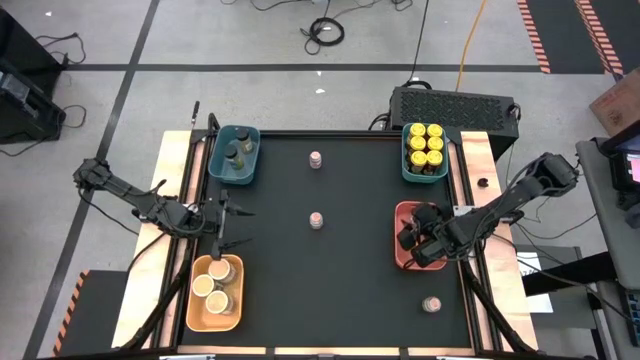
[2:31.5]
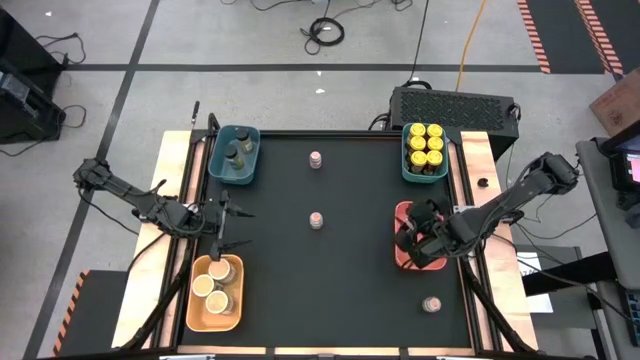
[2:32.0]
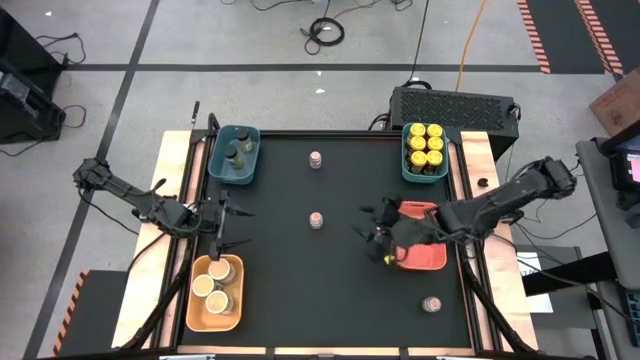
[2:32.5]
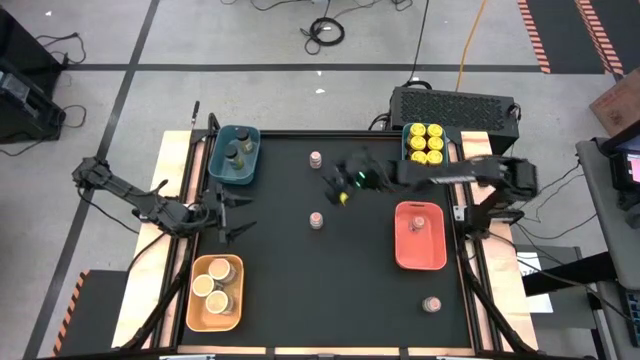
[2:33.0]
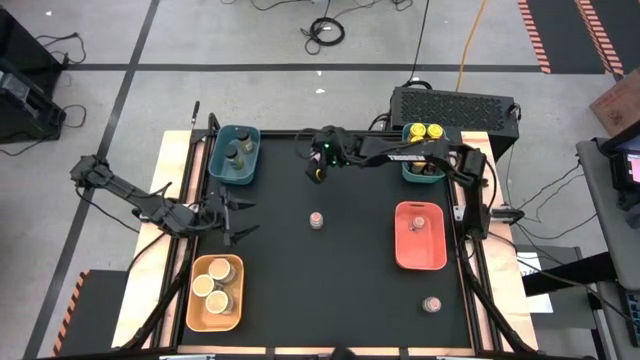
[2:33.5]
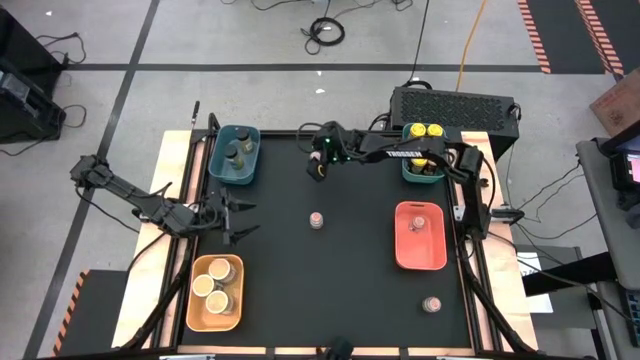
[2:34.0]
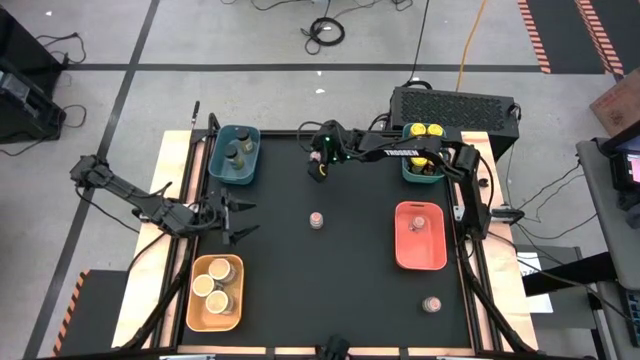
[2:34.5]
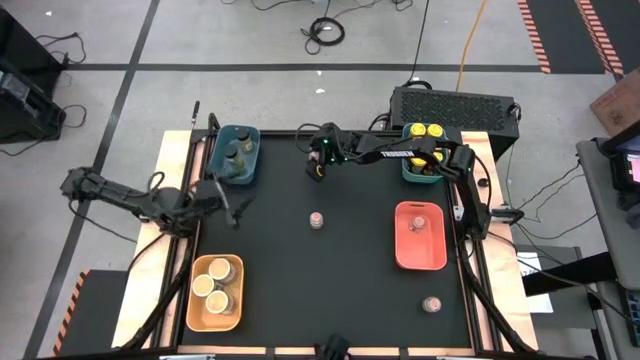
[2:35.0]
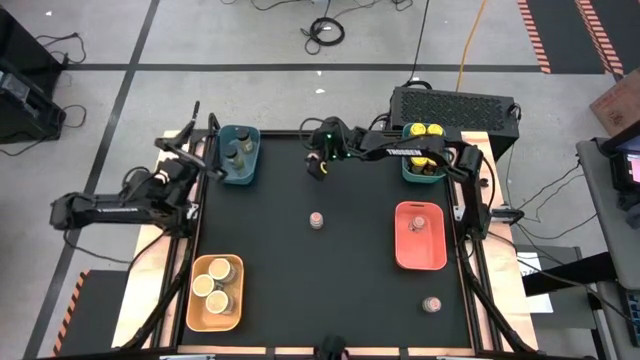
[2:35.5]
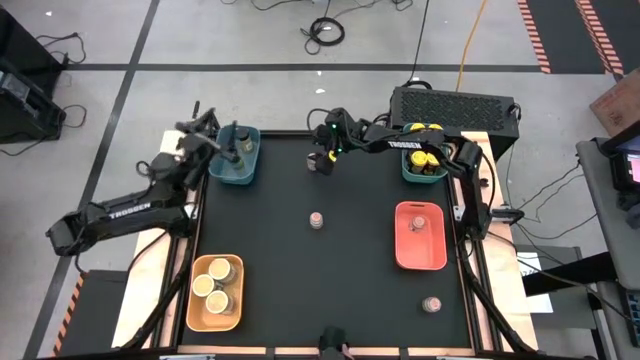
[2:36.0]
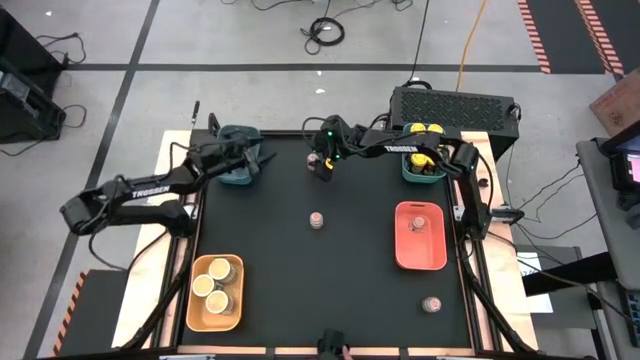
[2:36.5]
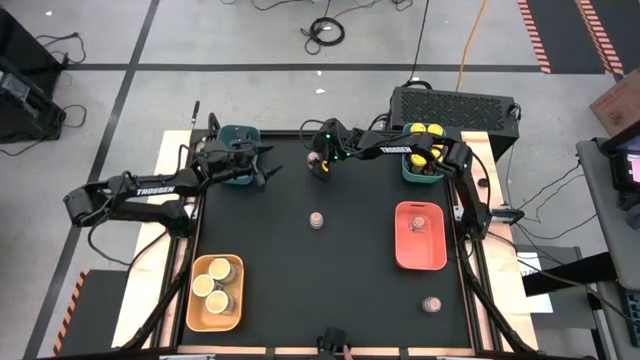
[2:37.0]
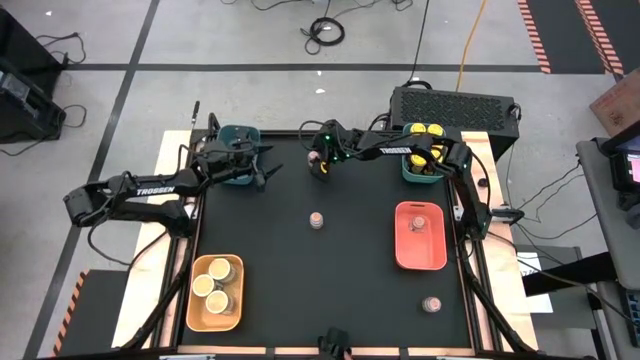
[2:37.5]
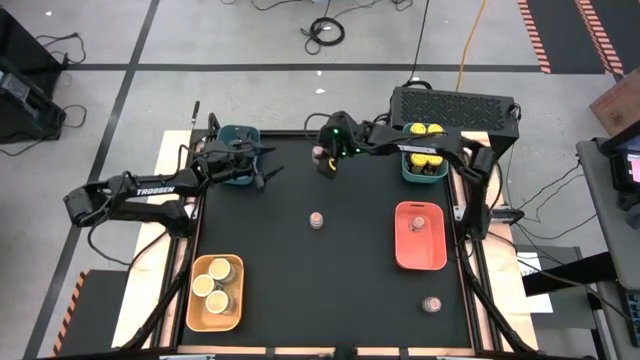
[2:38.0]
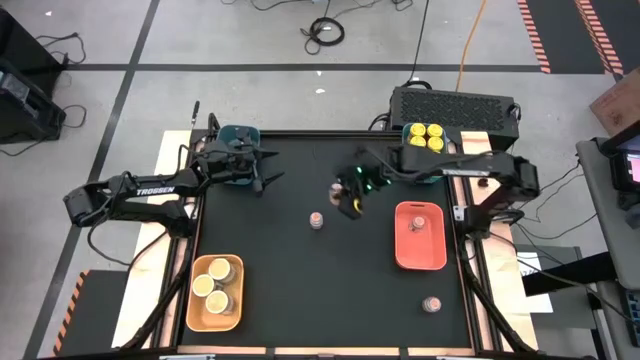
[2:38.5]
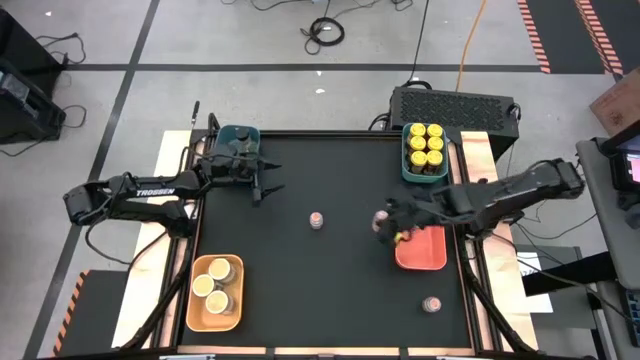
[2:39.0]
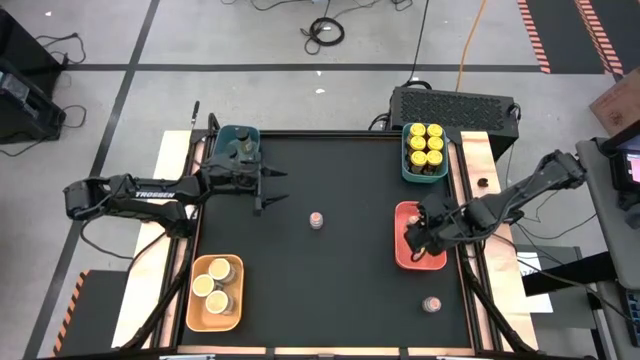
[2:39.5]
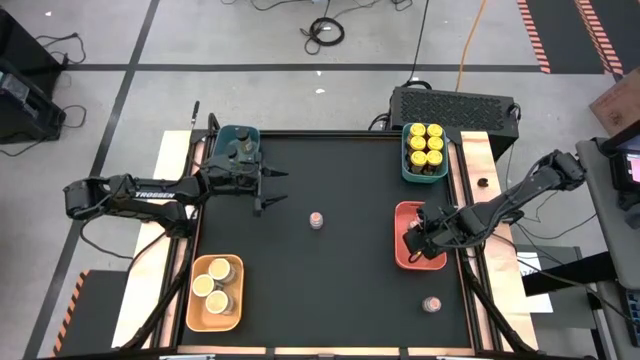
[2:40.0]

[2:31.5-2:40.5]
Task: Sort spices by type
Put the brown spice bottle into the orange bin

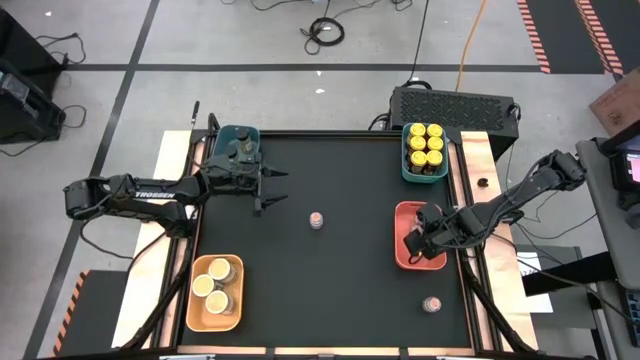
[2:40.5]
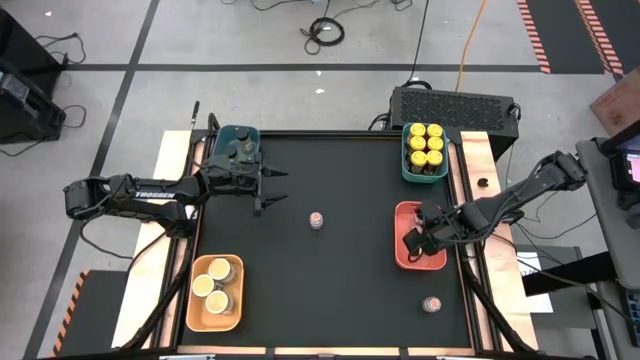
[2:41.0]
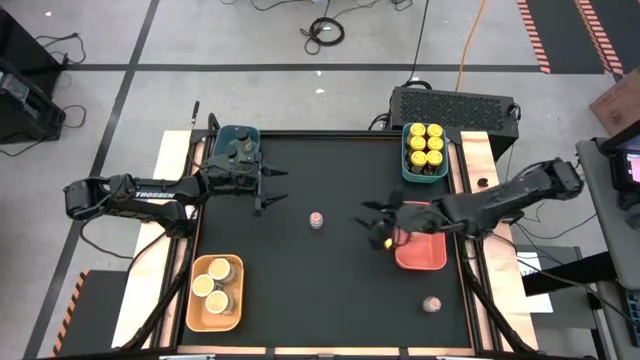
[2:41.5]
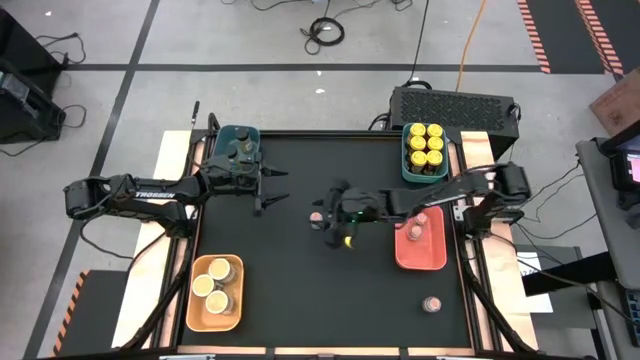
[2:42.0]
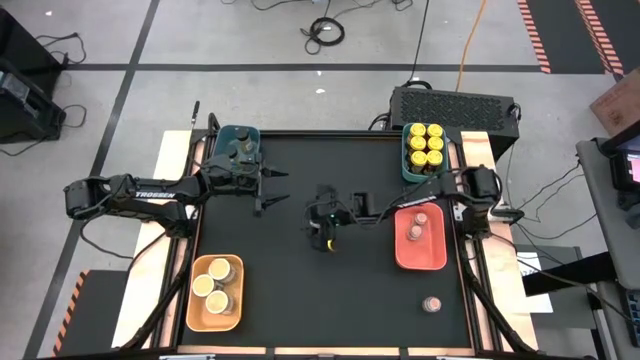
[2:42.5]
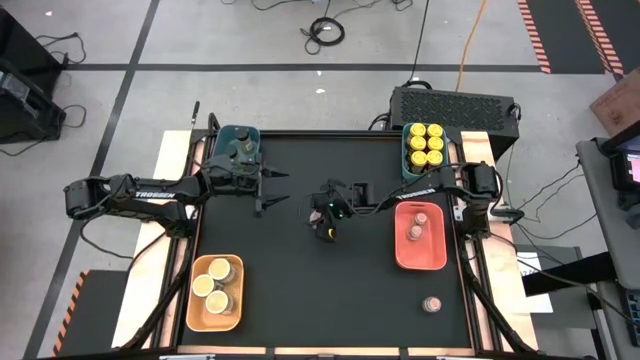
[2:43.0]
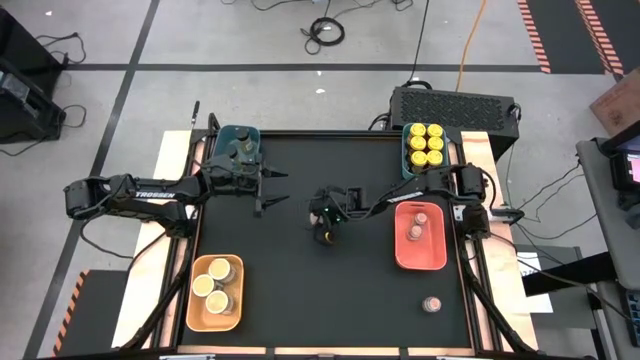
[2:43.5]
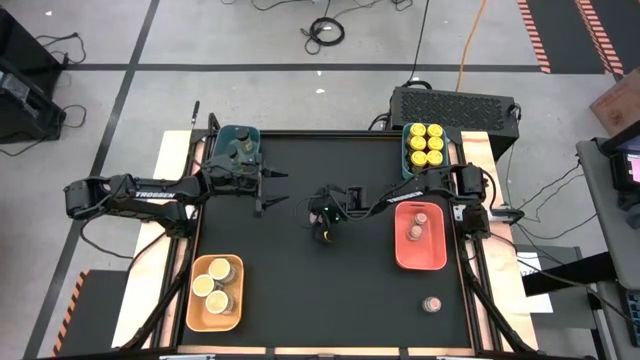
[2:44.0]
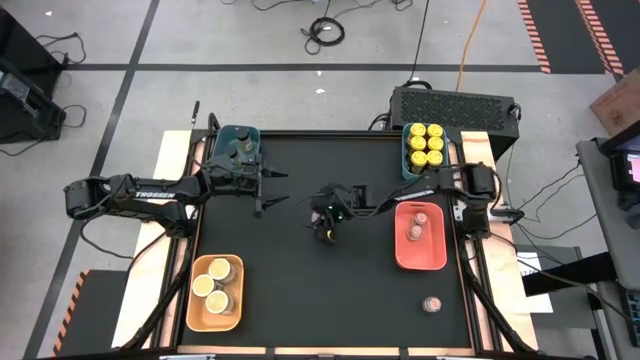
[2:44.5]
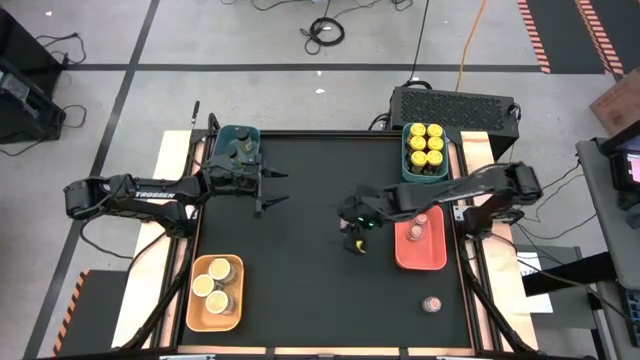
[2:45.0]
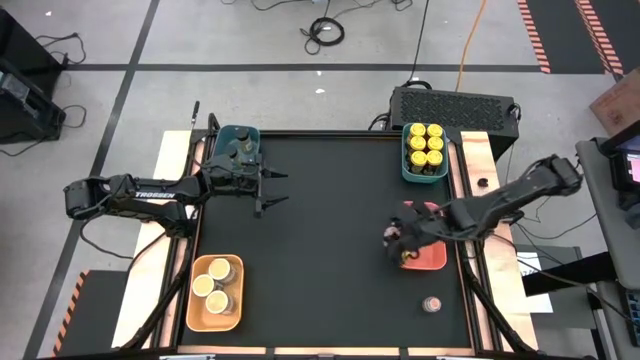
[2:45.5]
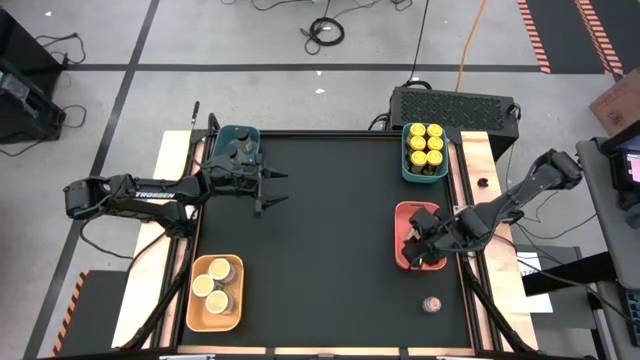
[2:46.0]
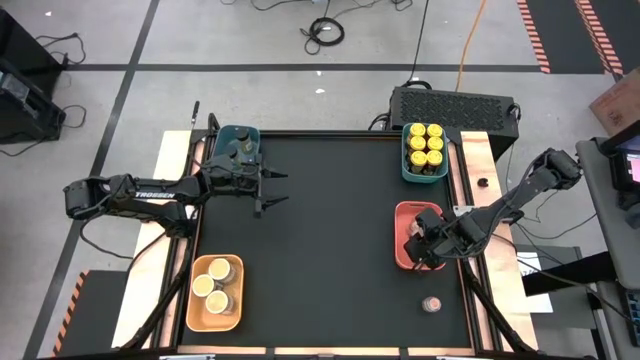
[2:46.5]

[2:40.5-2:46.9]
Put the brown spice bottle into the orange bin

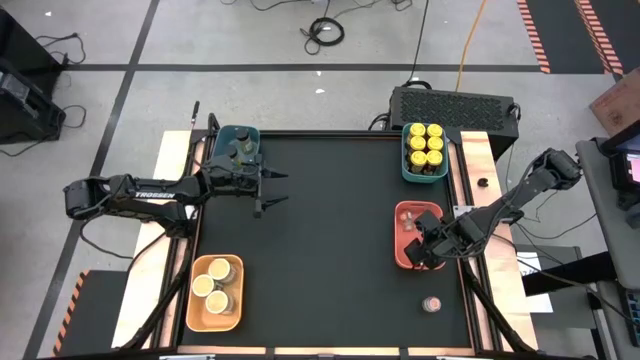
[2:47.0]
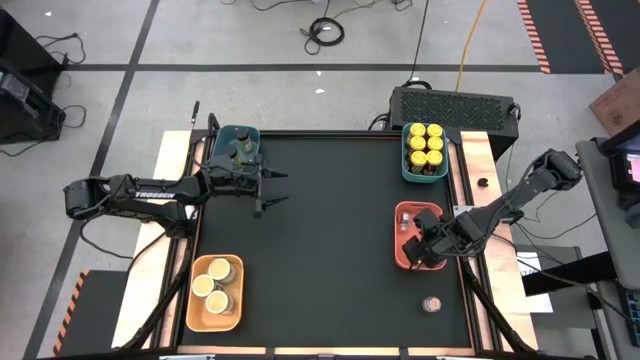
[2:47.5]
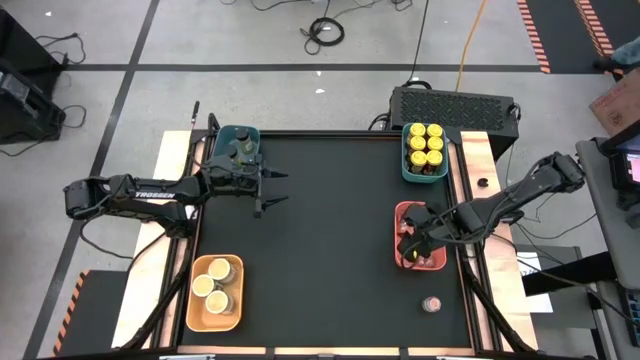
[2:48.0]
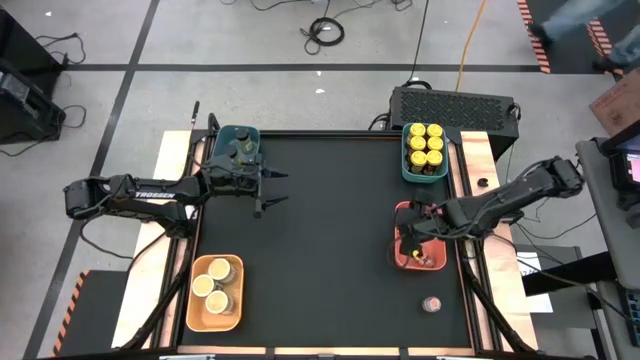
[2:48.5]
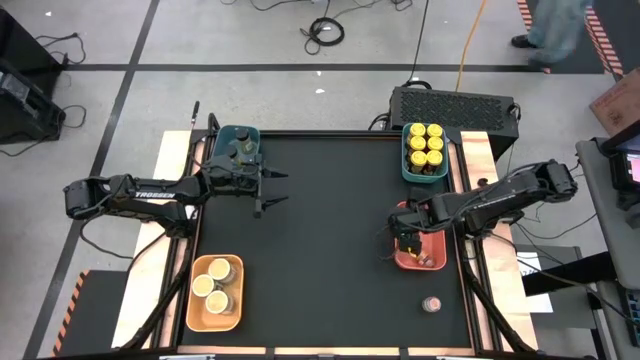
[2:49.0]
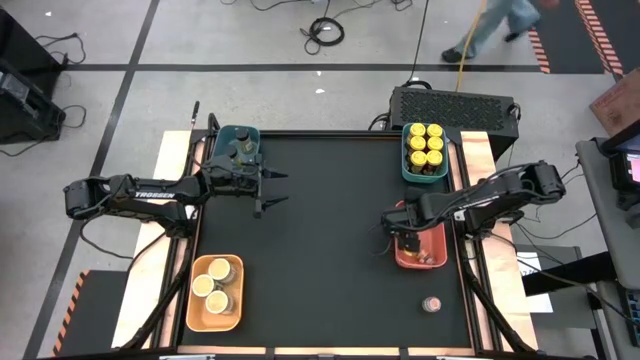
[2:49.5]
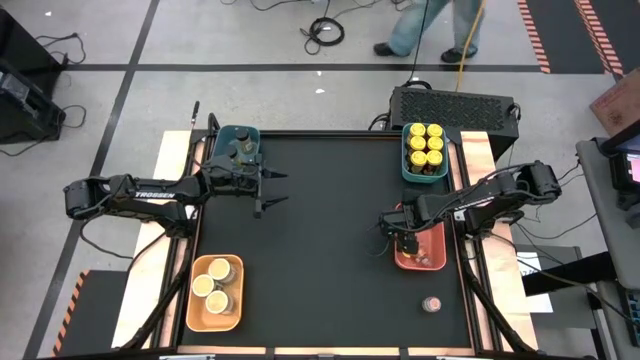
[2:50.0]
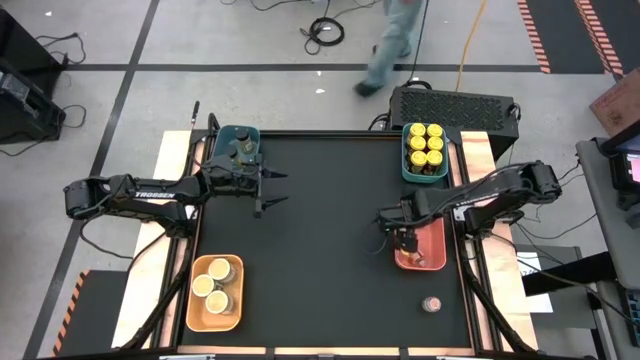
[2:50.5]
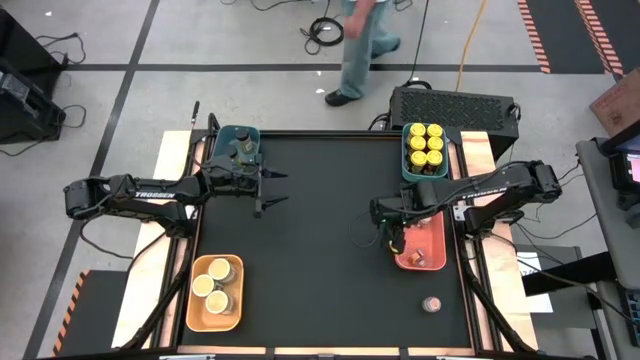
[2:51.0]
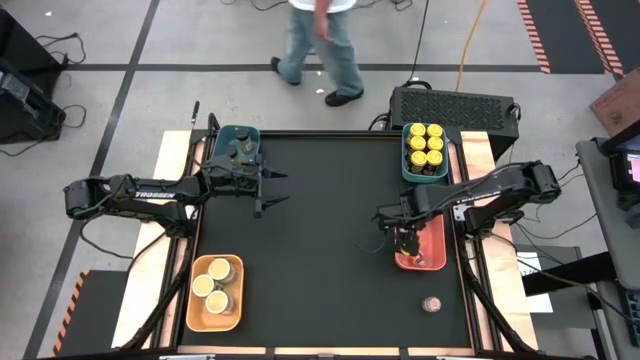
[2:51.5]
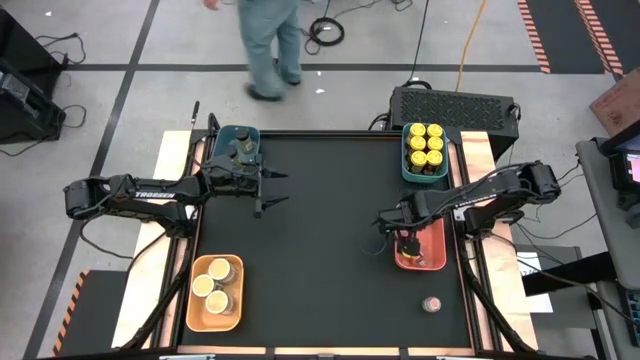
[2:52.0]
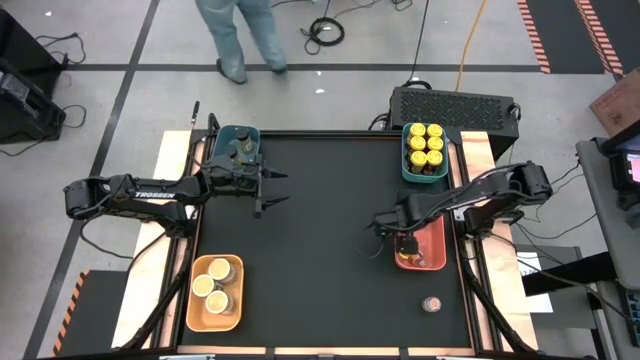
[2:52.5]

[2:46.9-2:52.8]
Adjust the brown spice bottle into the orange bin
